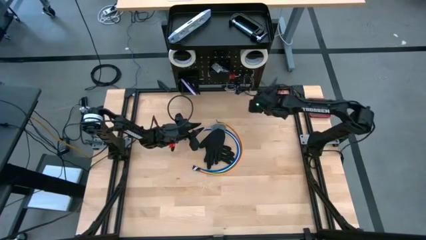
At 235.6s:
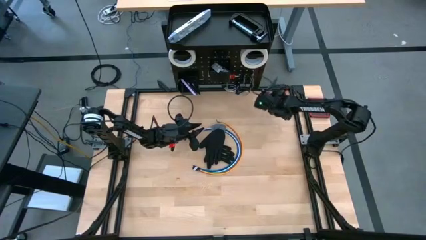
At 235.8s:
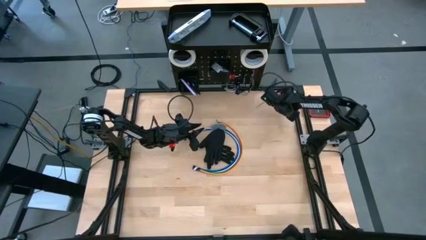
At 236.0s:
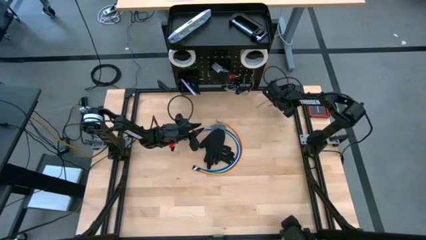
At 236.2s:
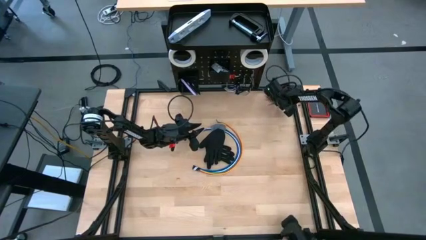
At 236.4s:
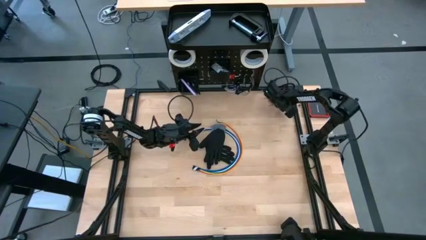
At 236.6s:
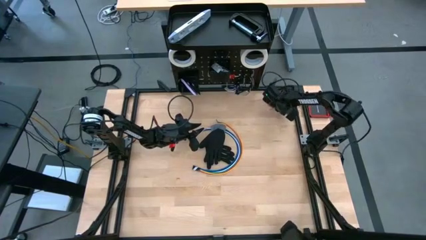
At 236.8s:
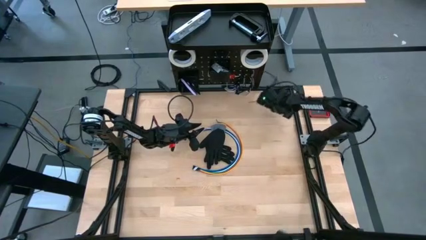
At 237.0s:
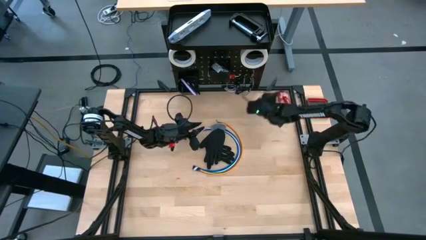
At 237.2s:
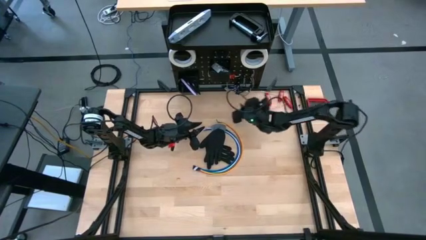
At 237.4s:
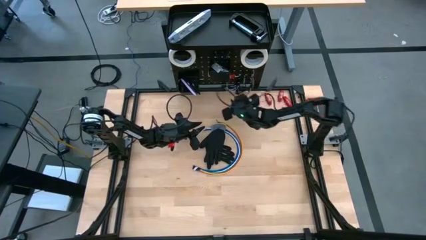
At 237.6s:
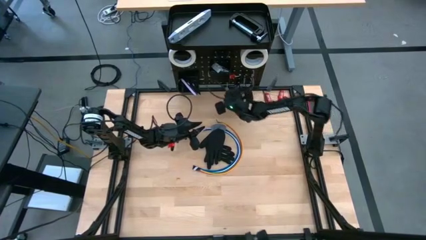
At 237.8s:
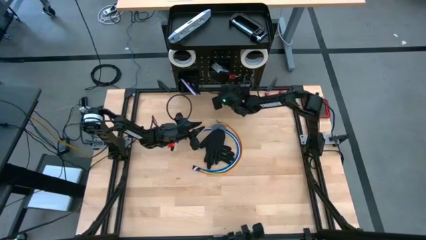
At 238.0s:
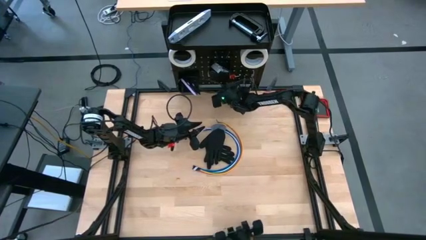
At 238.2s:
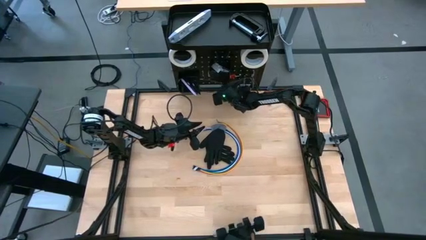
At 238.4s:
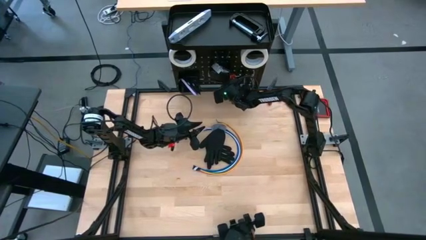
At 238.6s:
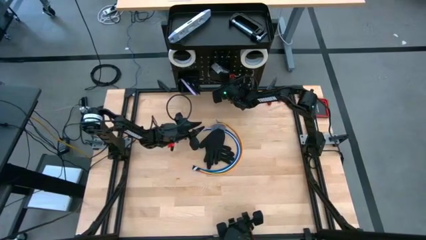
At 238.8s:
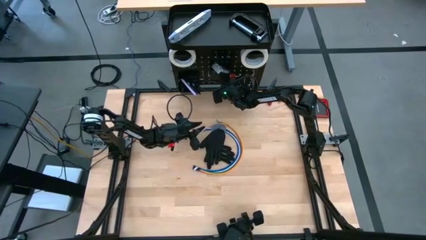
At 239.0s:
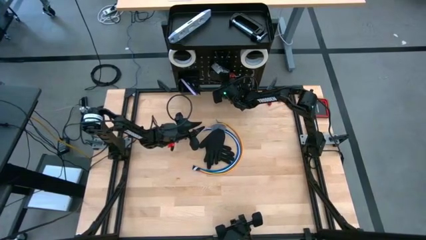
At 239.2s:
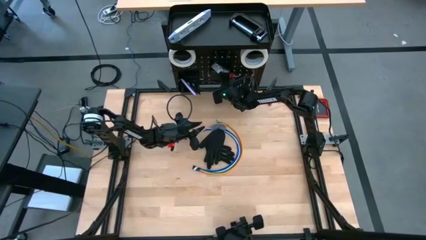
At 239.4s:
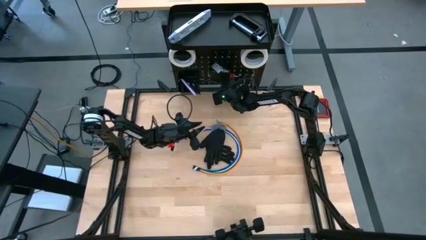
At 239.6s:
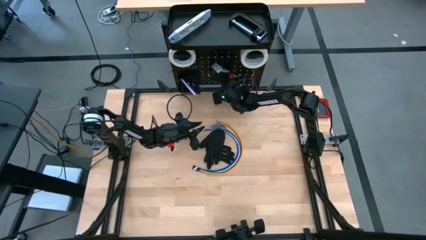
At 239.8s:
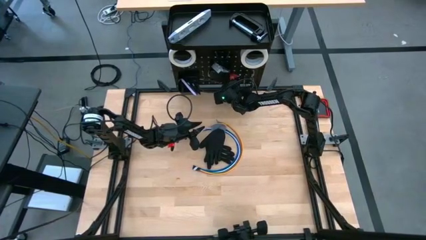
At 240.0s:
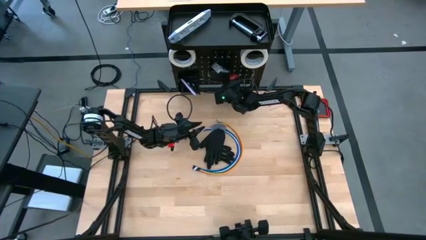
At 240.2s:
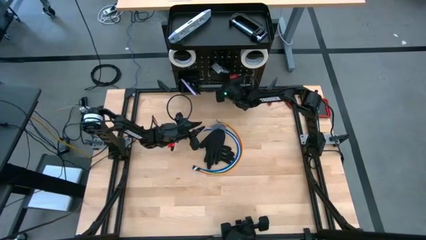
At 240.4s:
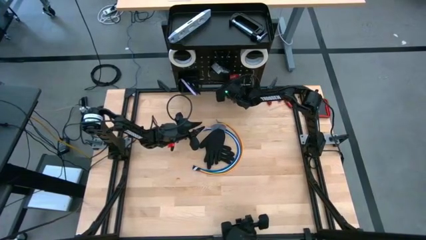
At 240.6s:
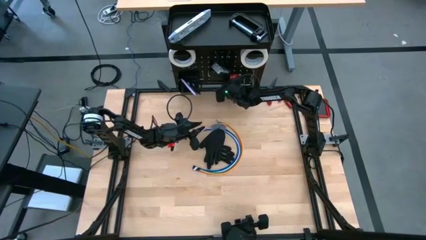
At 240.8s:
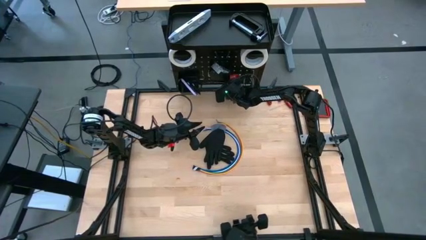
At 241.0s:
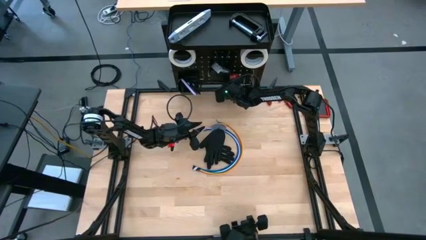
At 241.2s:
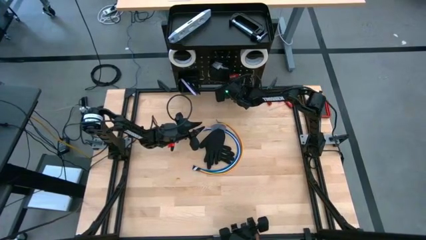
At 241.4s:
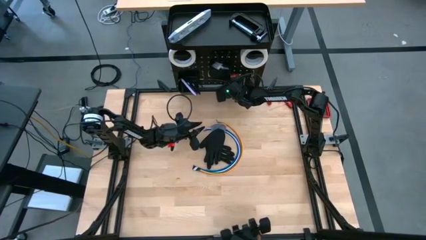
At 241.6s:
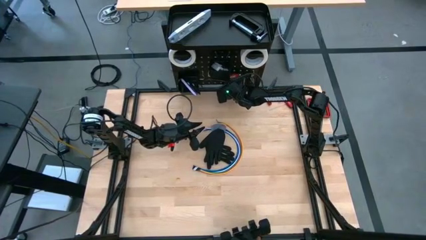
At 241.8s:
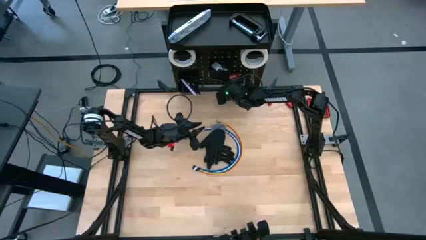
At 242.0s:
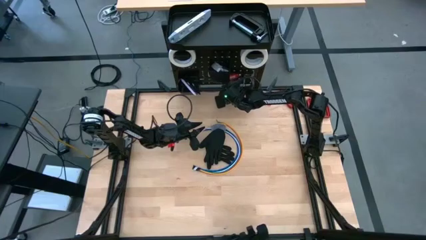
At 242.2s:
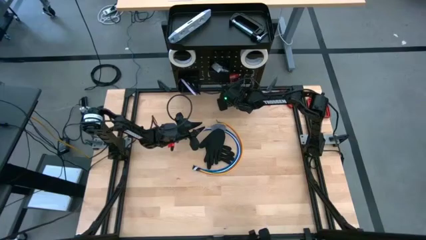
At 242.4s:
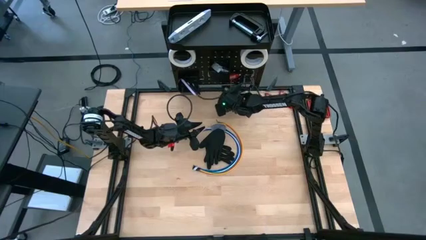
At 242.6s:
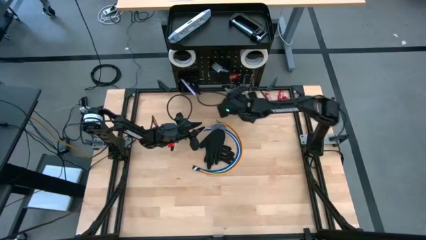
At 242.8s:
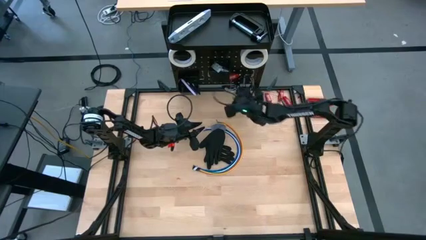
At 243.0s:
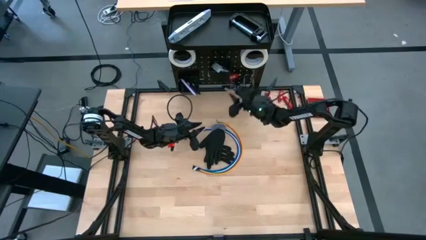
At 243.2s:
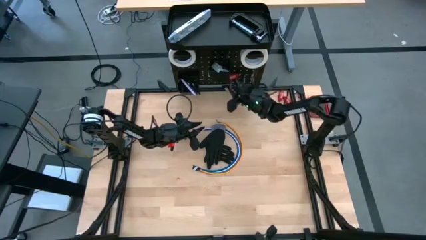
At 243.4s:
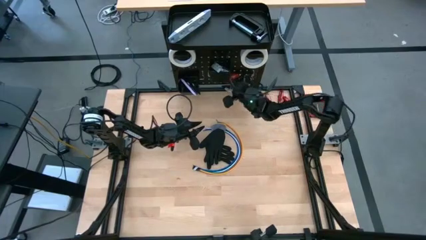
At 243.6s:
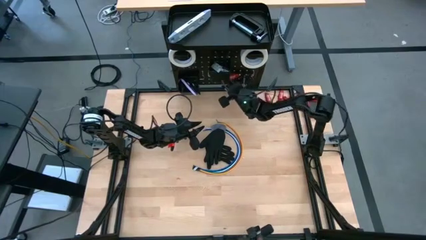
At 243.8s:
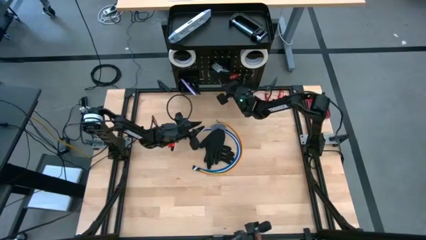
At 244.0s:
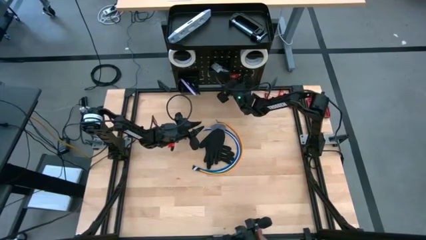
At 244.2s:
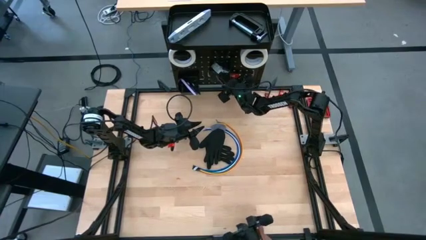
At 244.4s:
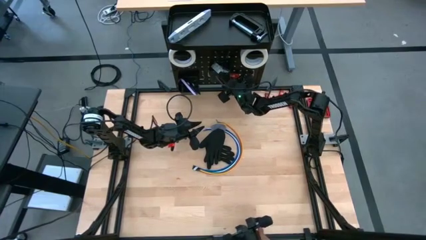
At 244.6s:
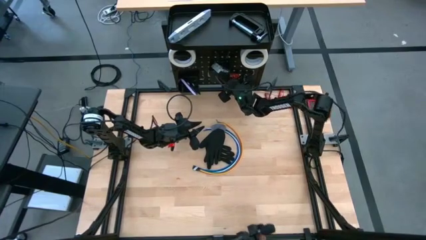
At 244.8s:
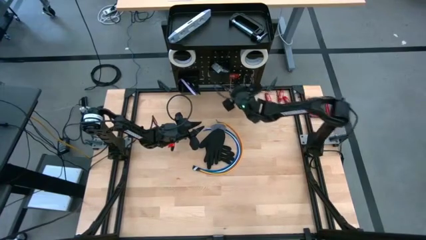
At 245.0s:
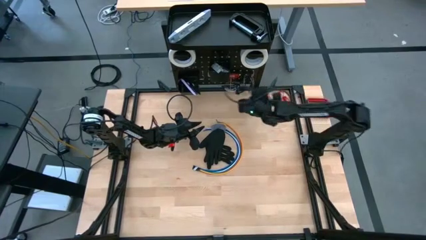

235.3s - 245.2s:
Task: Hang tools onto peg board
Adjust the red allen wrench

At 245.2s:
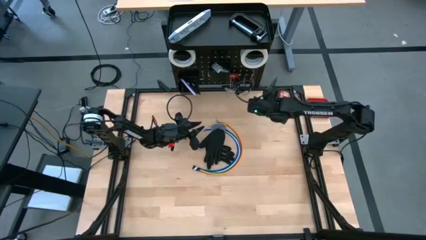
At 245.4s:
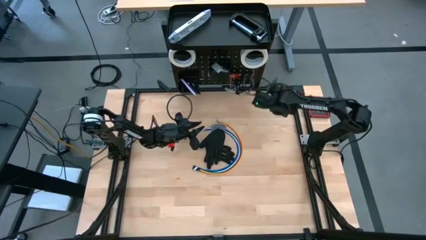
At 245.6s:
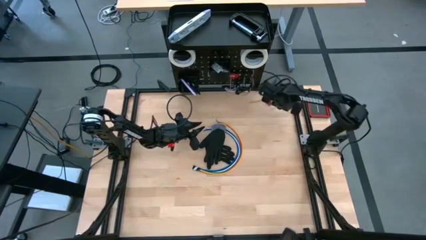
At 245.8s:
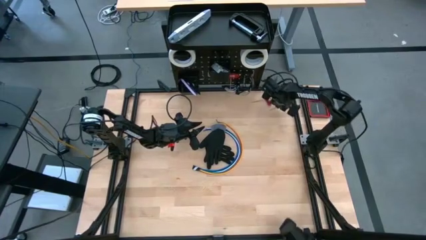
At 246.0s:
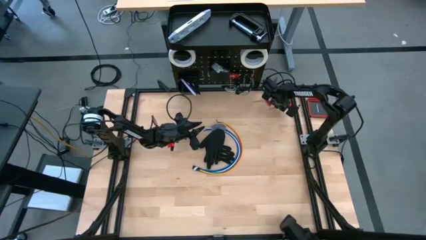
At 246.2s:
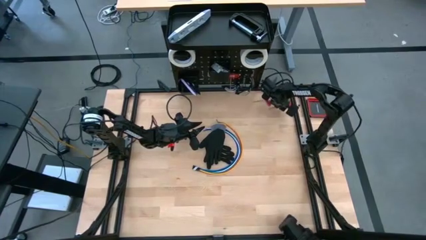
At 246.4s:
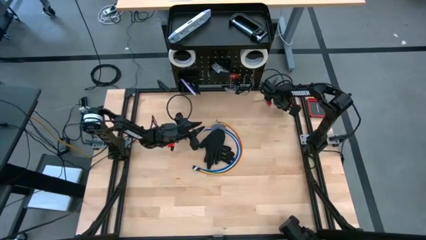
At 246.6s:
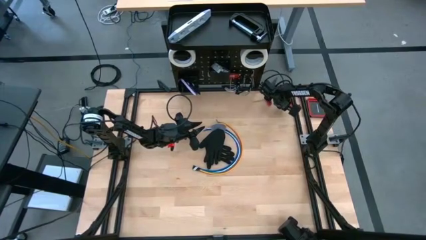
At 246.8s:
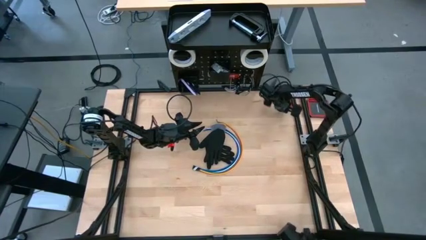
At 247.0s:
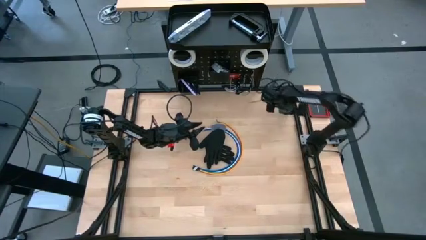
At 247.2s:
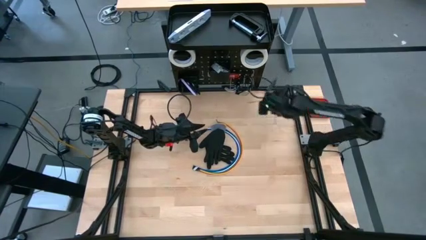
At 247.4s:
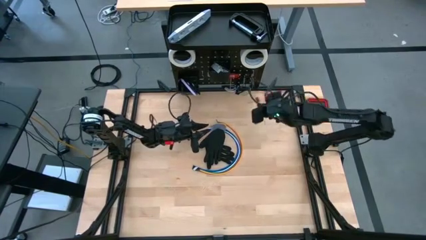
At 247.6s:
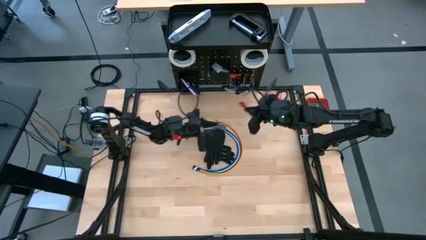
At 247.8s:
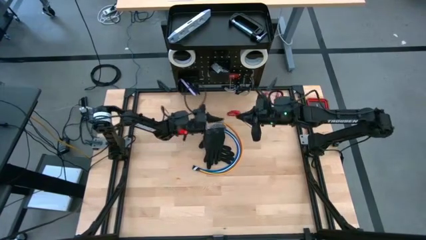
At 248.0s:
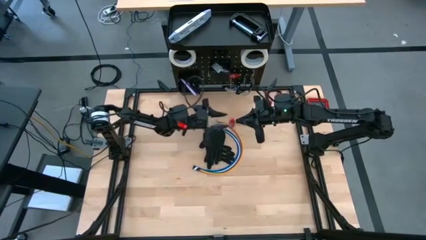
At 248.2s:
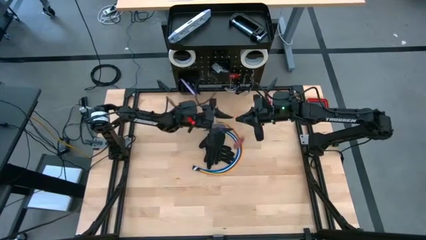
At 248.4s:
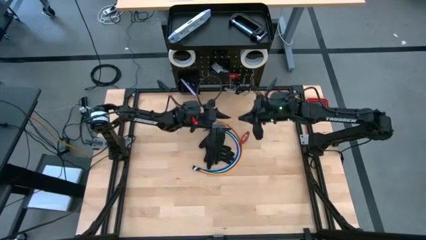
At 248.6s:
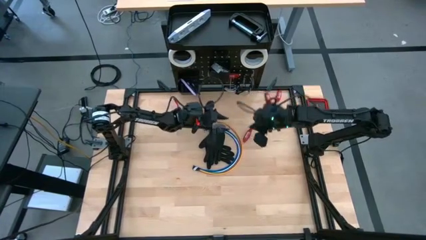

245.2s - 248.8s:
Hang the red allen wrench on the peg board

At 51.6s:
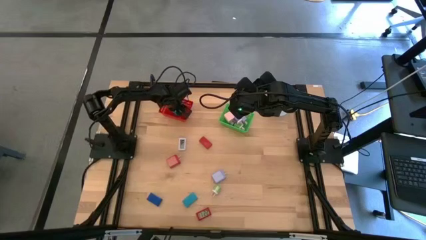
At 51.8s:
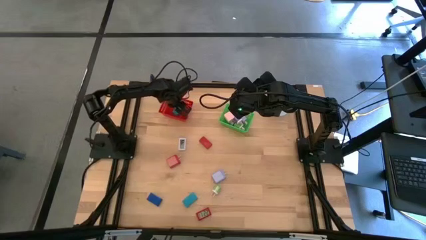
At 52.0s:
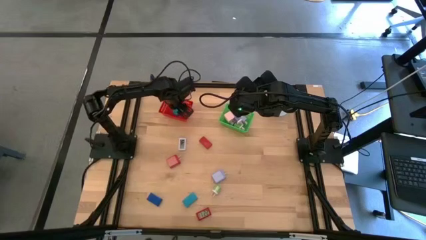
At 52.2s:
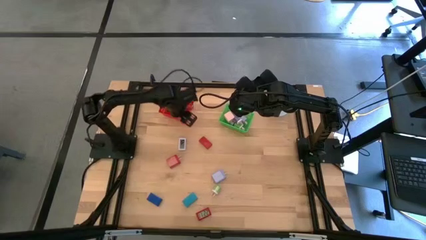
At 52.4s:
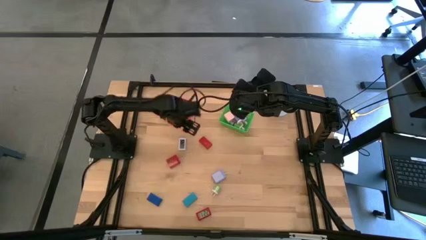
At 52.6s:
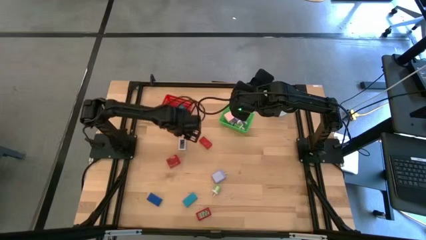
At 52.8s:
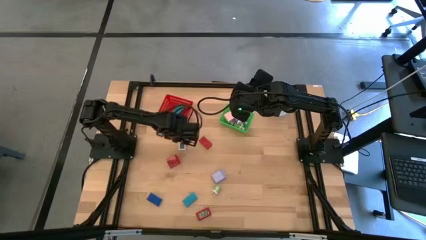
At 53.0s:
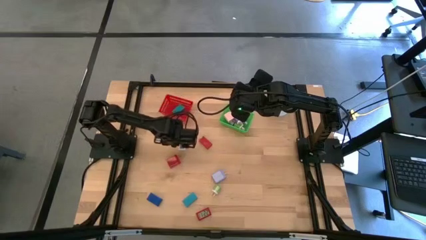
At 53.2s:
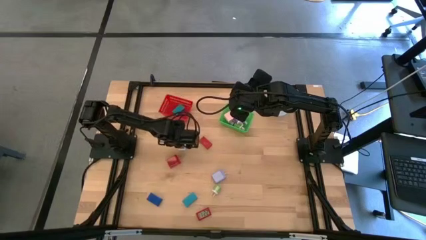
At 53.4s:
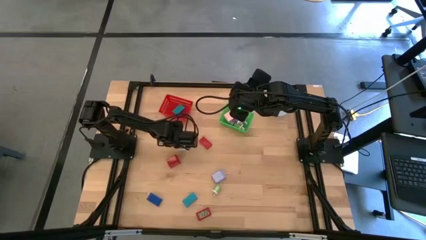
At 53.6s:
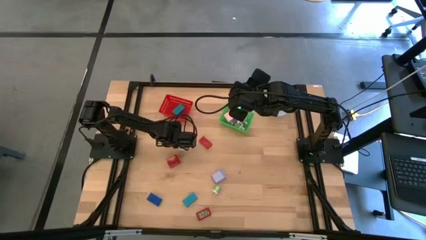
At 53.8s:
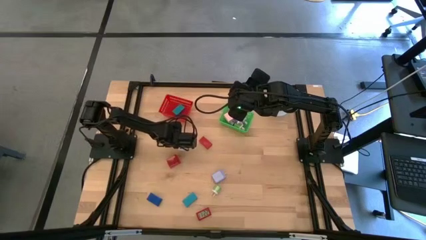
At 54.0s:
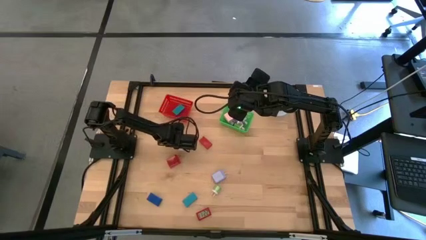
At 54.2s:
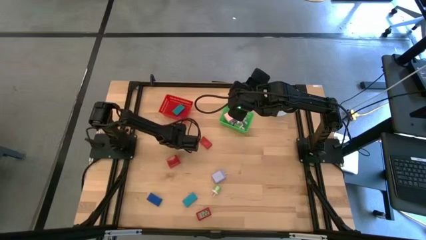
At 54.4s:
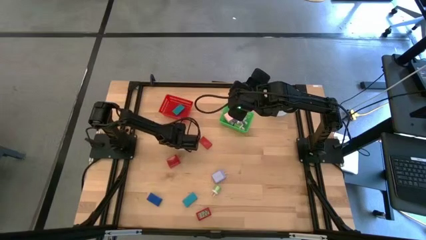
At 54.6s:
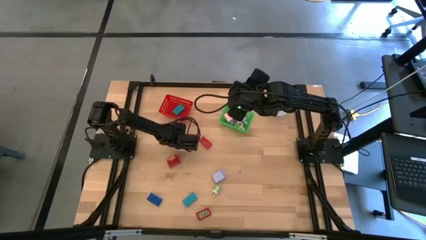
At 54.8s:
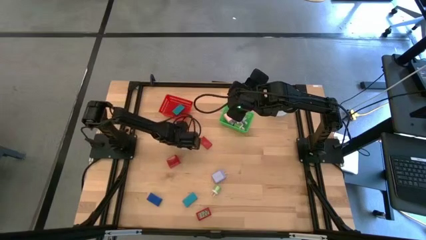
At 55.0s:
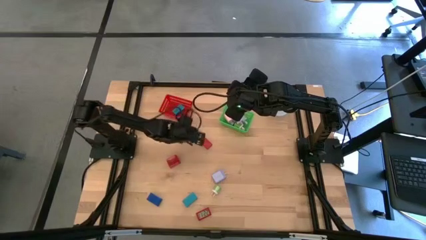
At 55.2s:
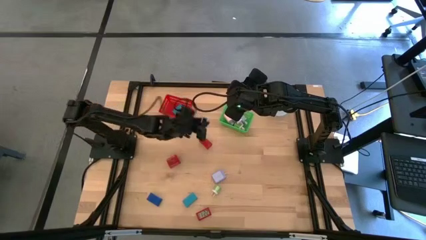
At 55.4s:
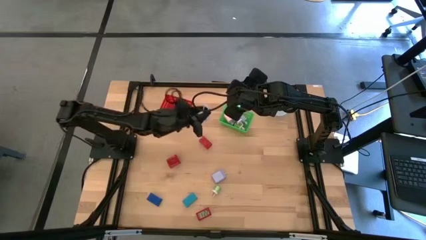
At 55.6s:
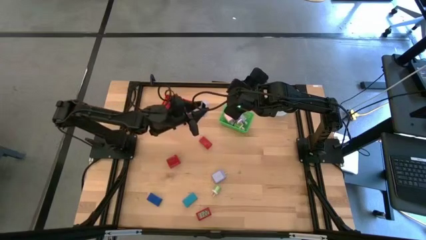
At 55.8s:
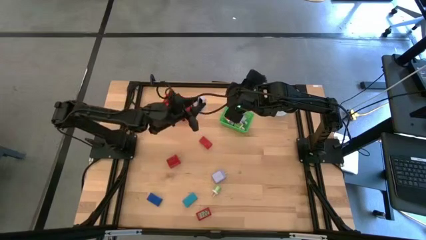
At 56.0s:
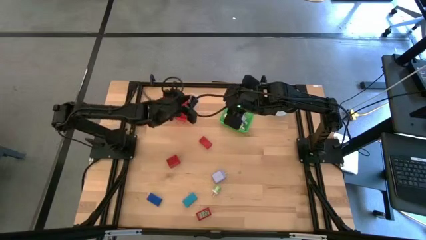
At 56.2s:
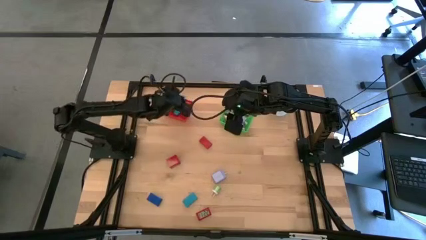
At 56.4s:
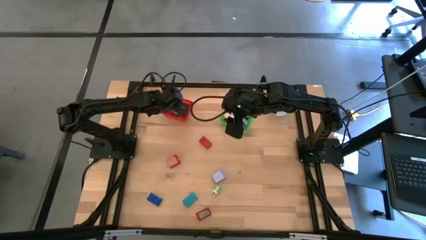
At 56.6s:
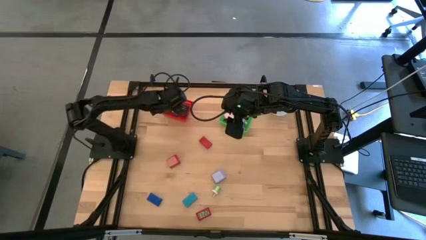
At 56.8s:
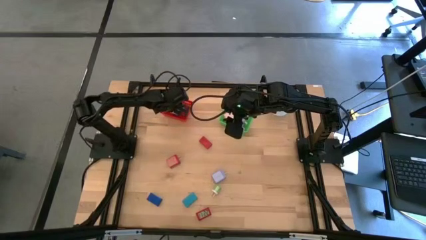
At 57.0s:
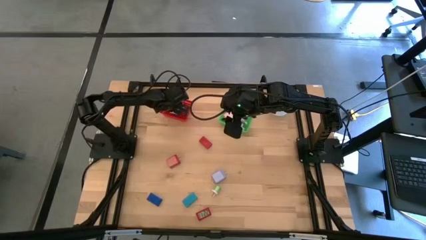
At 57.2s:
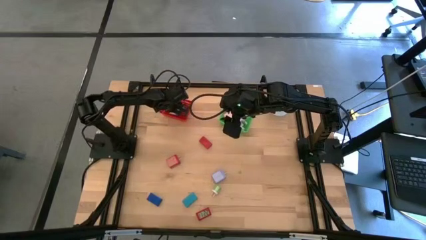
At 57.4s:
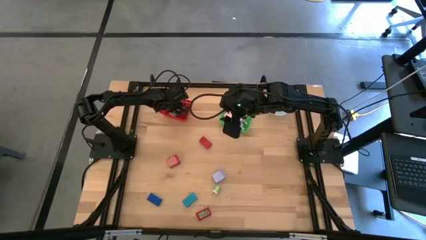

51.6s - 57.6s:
Task: Pick & Place Office items
Put the white digital clock into the red bin
